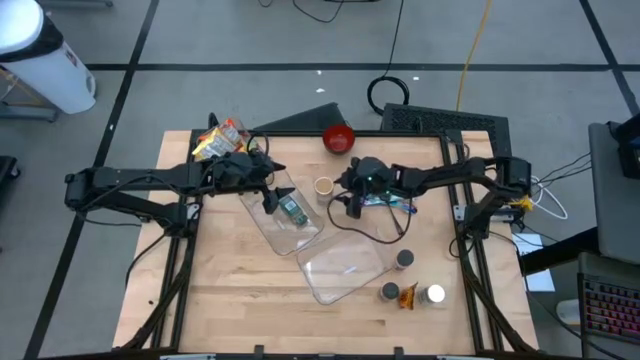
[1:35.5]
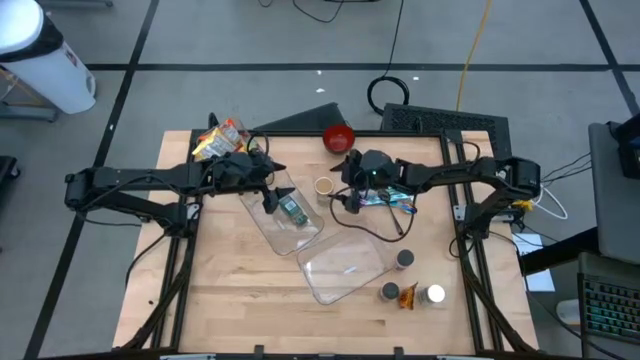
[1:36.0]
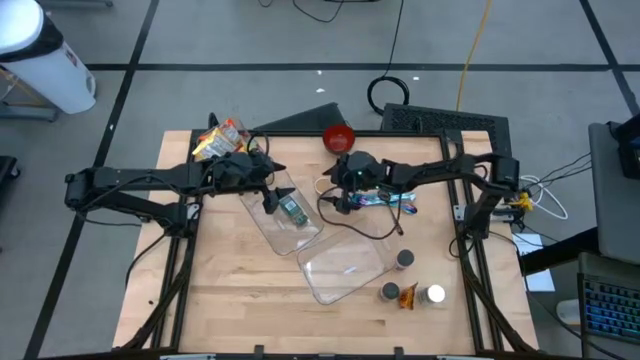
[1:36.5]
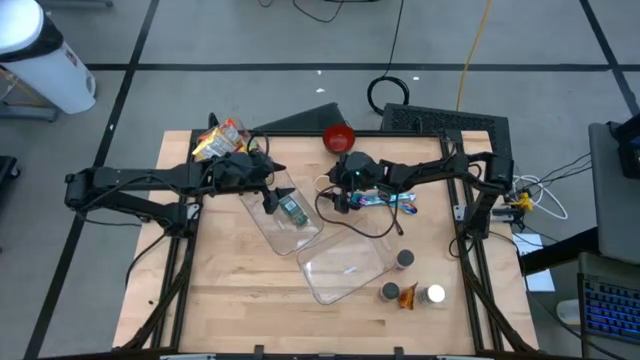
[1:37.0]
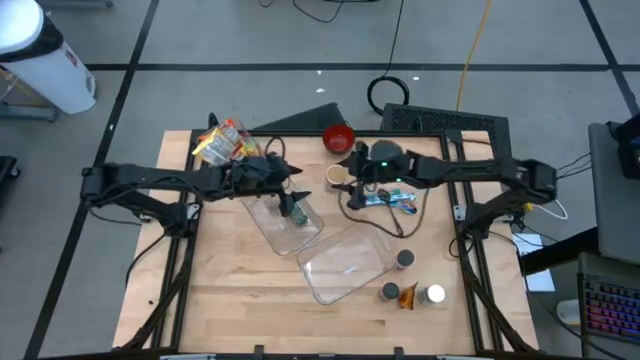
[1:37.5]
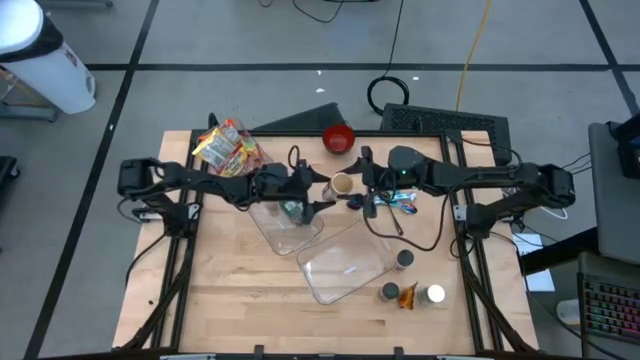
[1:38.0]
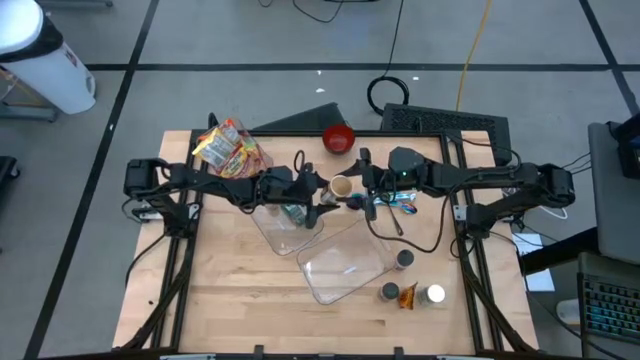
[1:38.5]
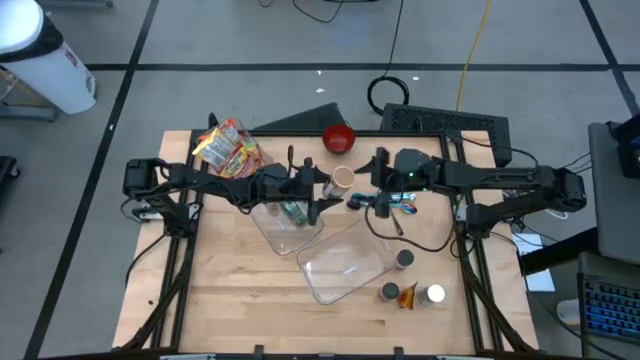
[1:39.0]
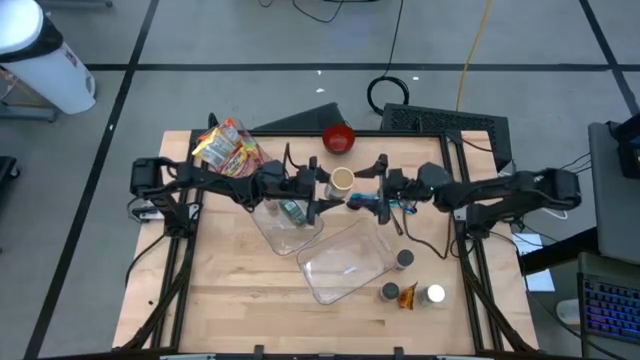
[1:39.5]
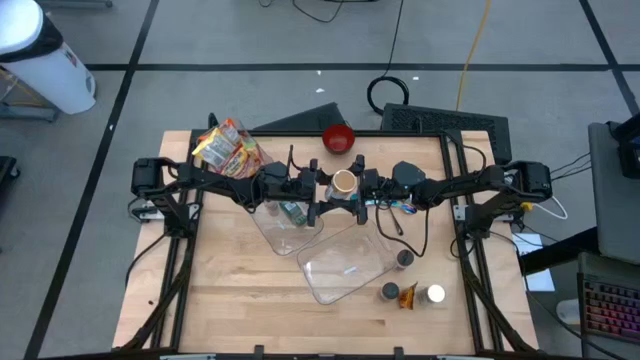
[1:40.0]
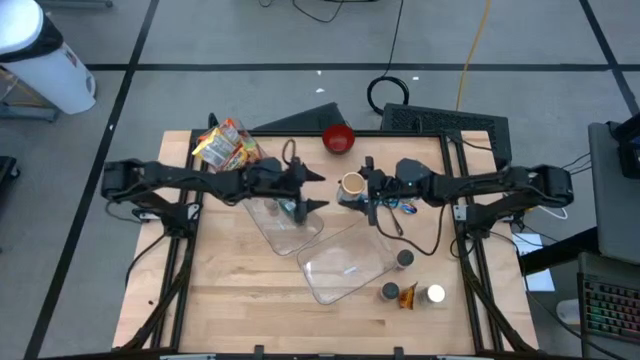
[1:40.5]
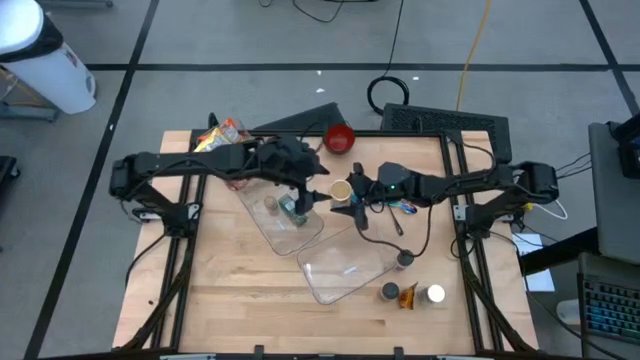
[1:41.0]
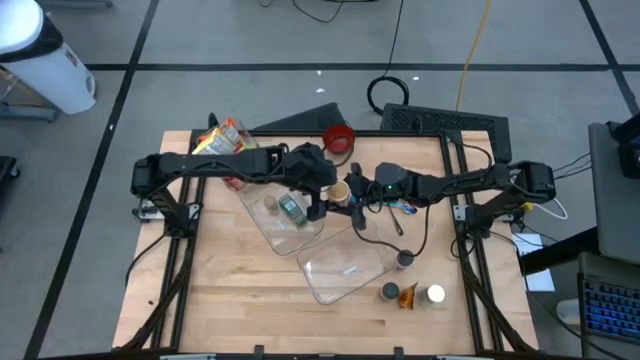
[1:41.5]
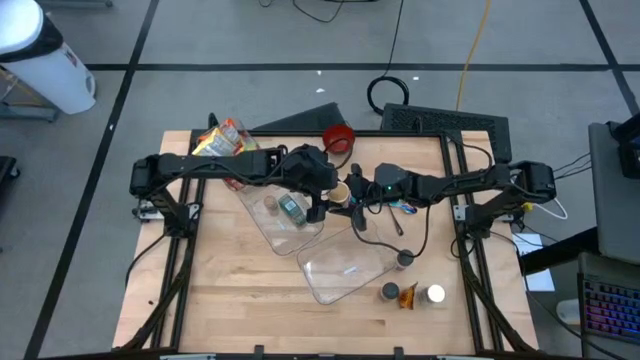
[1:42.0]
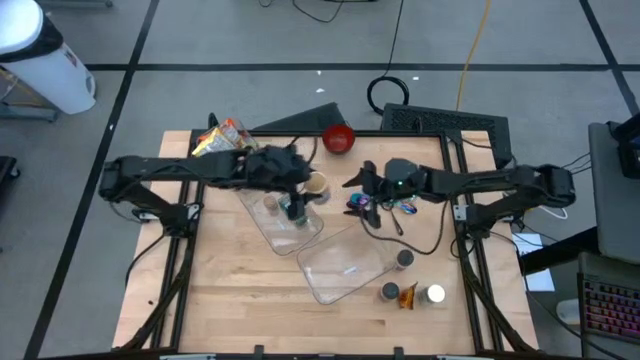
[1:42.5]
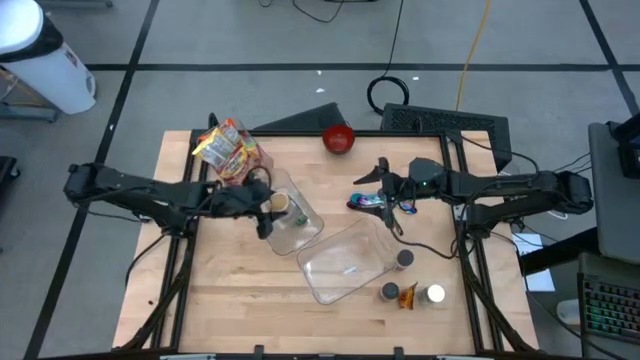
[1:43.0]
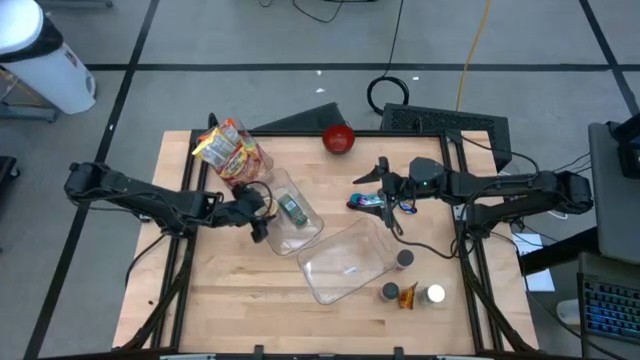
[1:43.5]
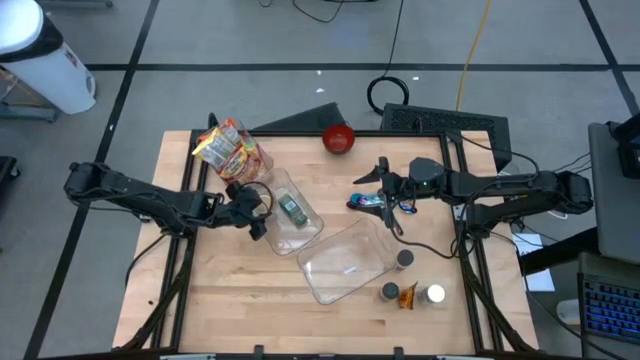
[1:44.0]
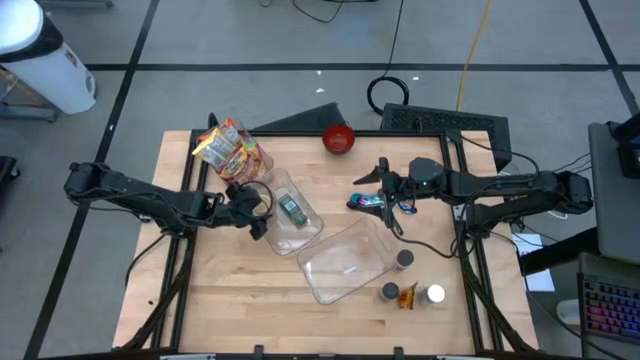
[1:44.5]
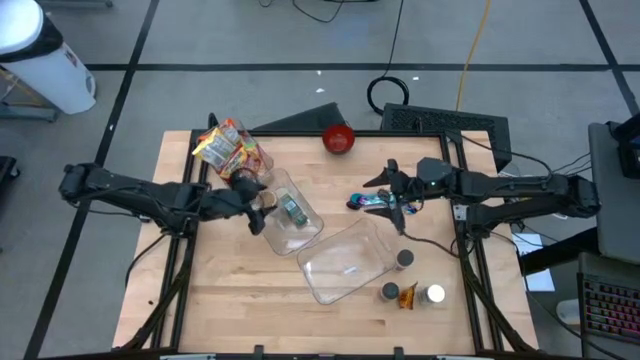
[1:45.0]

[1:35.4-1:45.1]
Task: Pick & Place Food Item
Put the gold seasoning bottle into the middle transparent bin

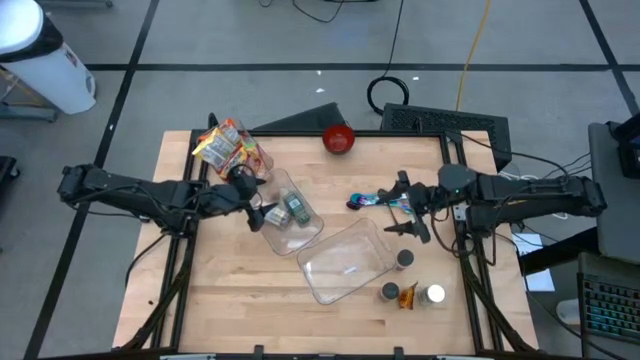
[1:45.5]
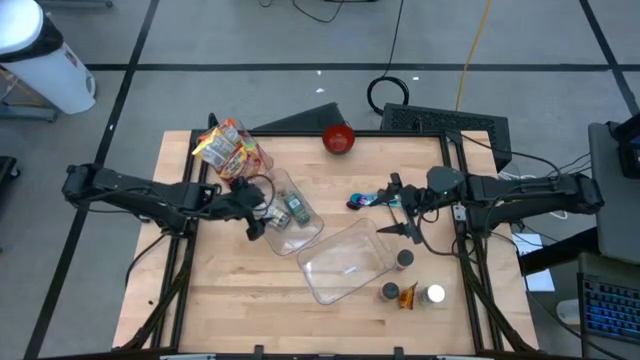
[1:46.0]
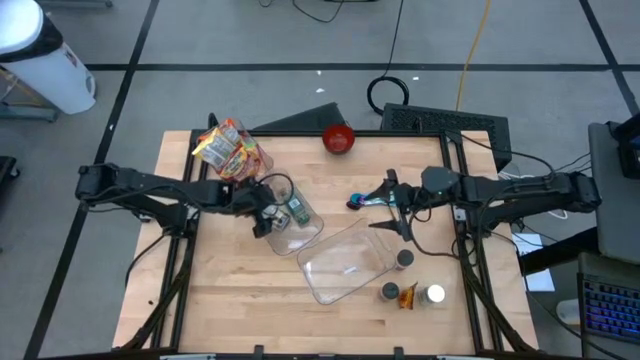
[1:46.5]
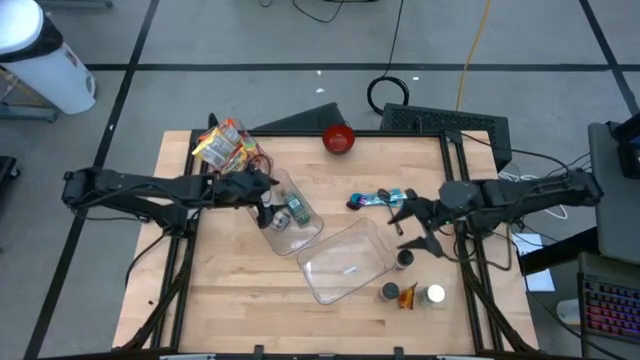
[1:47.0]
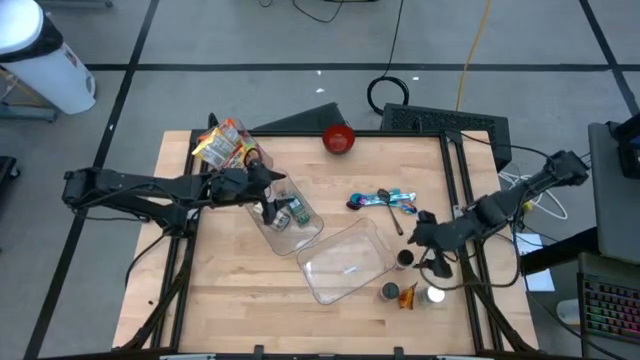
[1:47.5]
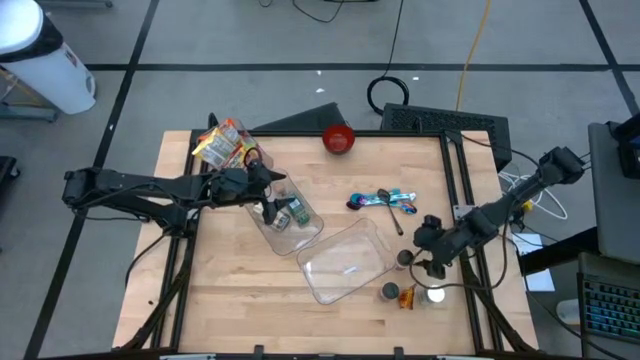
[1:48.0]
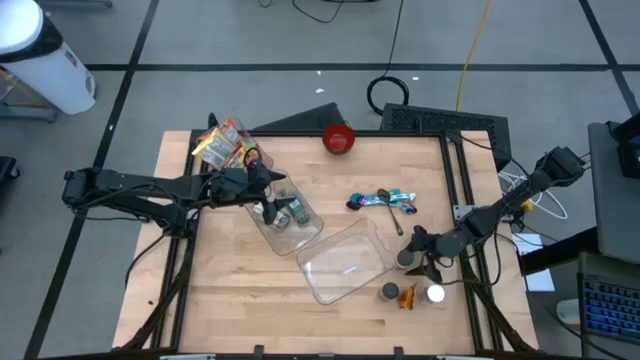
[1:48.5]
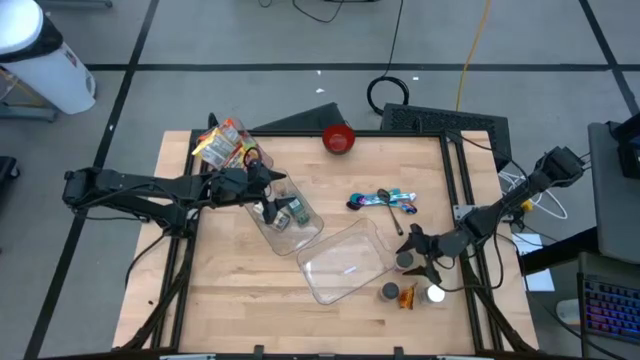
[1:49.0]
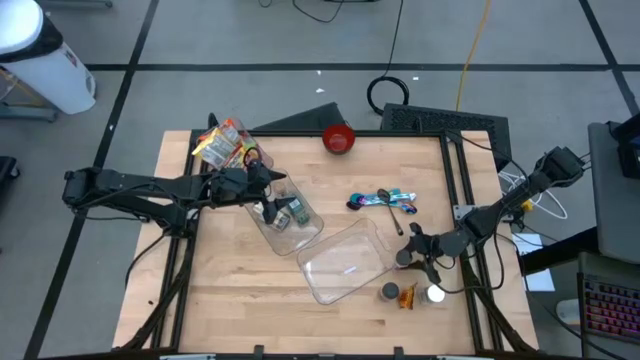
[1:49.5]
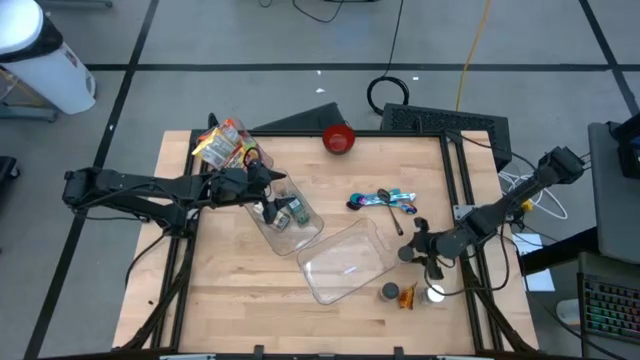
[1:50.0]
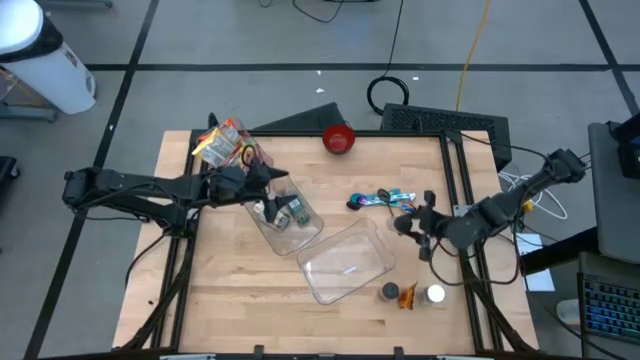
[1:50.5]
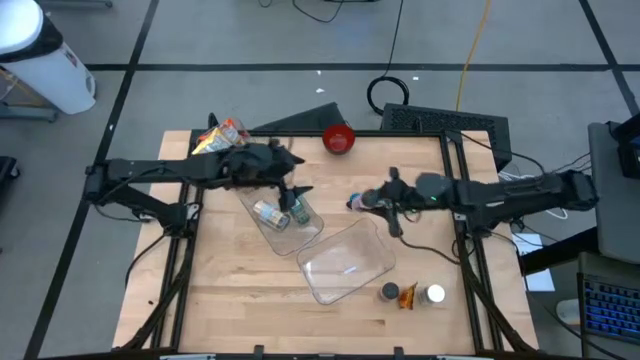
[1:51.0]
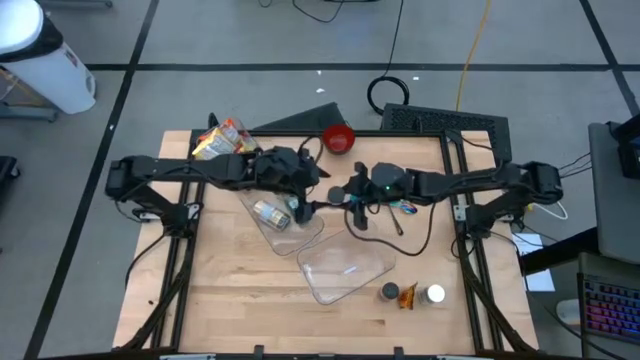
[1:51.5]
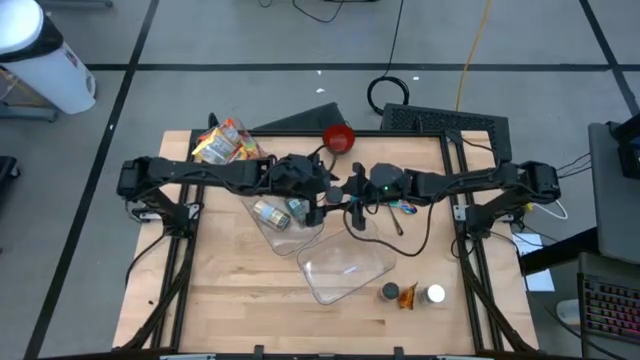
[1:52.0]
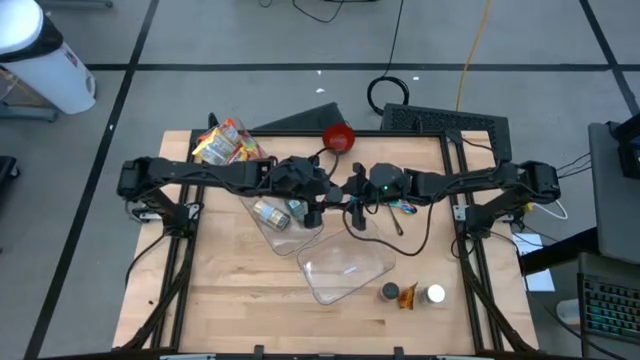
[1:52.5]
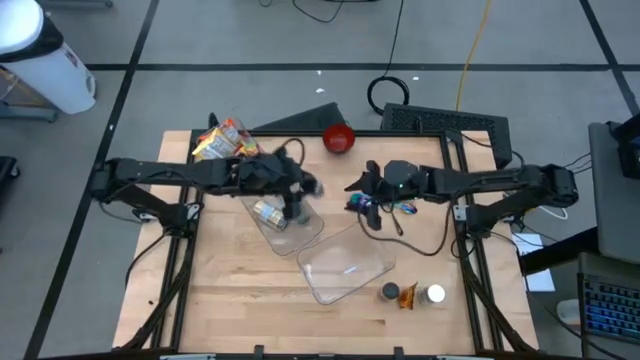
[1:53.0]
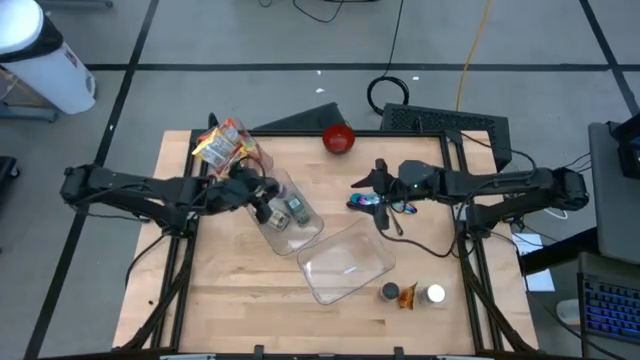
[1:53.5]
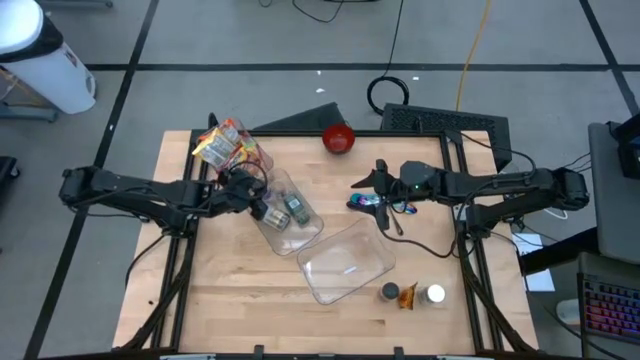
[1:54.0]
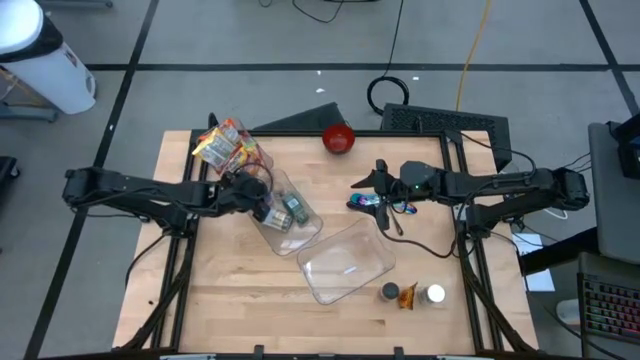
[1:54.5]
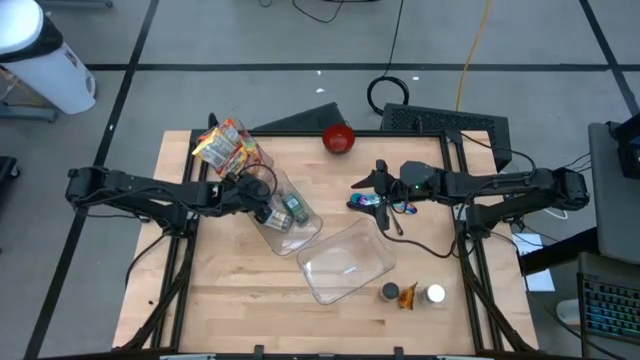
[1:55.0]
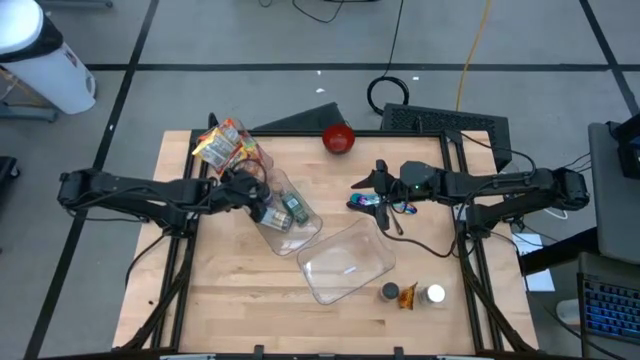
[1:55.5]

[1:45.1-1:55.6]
Put the purple seasoning bottle into the middle transparent bin

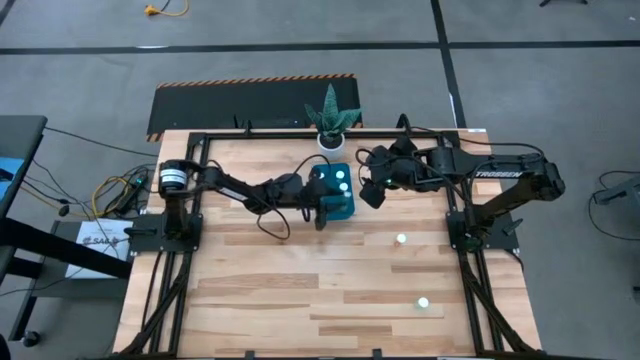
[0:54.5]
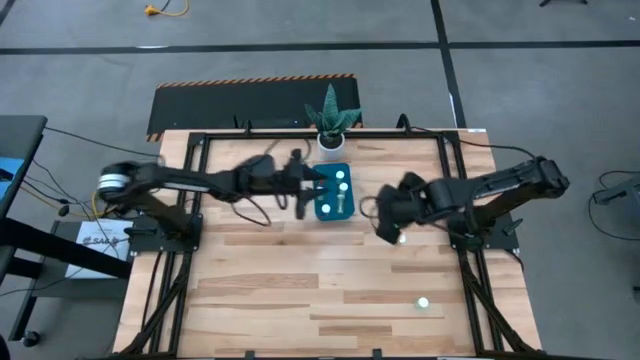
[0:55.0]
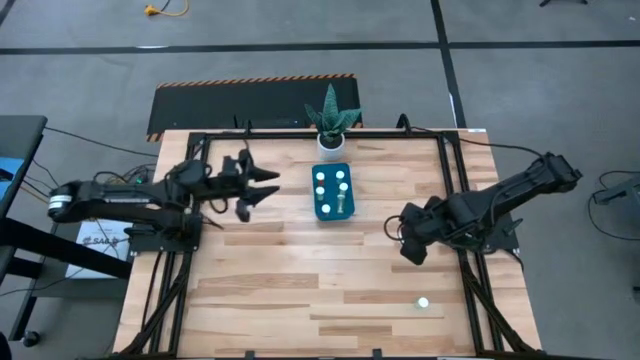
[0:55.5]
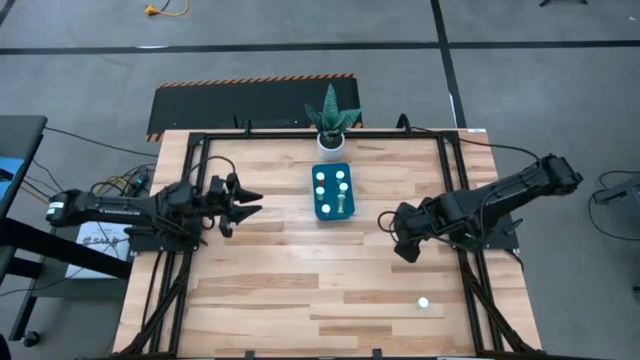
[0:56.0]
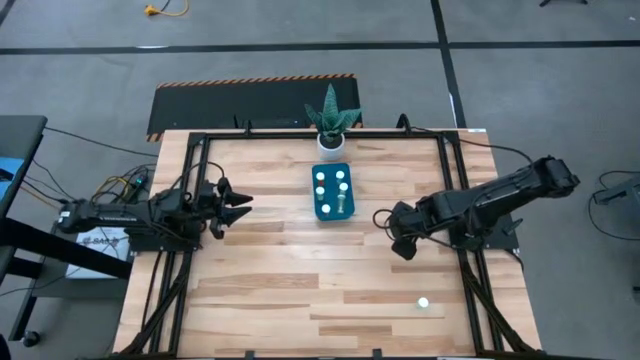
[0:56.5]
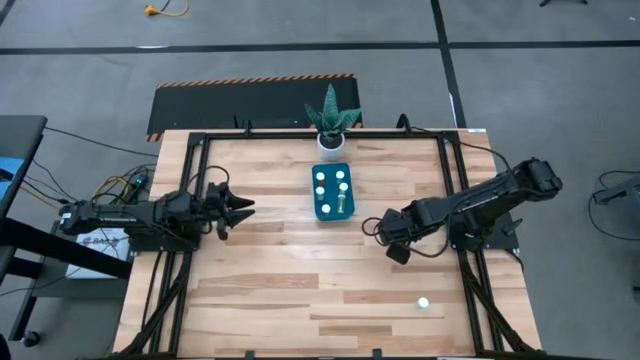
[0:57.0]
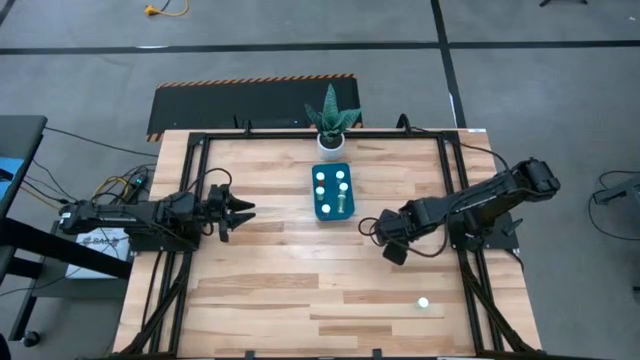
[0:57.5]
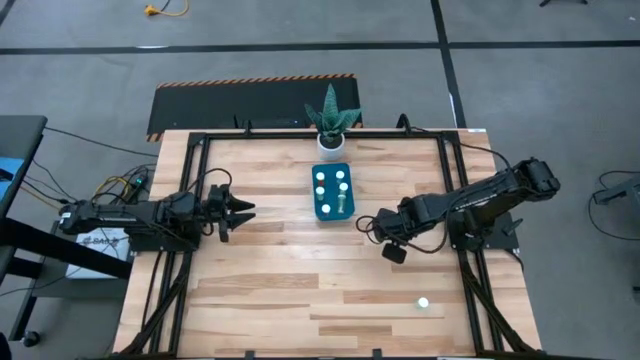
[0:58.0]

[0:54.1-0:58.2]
Task: Pick and place pill bottles into a basket
Put the yellow pill bottle into the blue container
